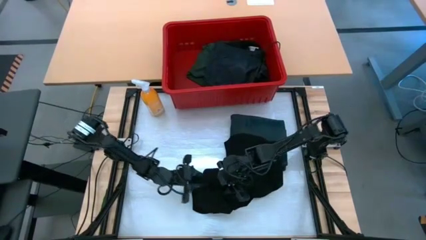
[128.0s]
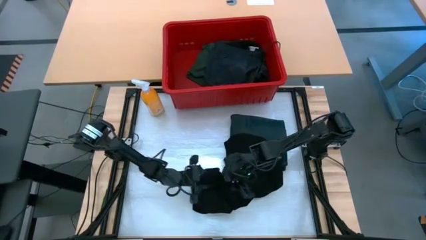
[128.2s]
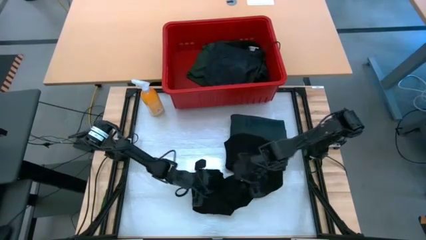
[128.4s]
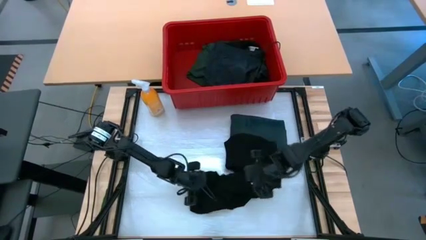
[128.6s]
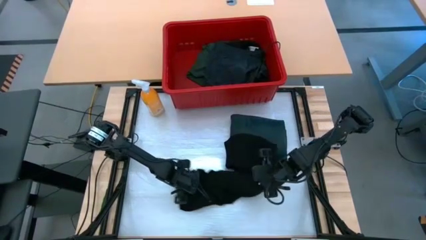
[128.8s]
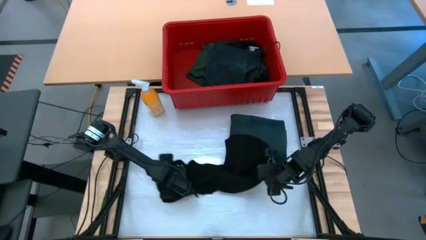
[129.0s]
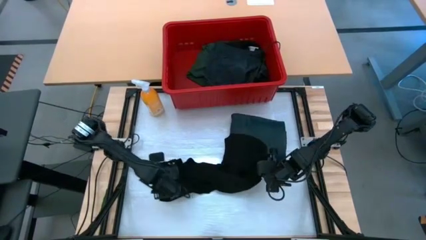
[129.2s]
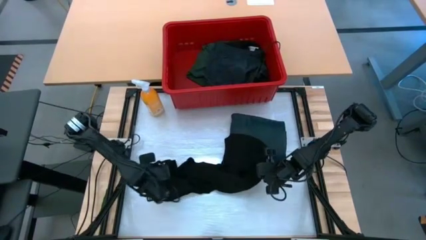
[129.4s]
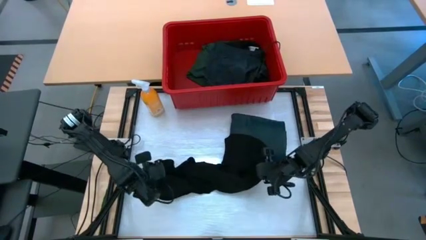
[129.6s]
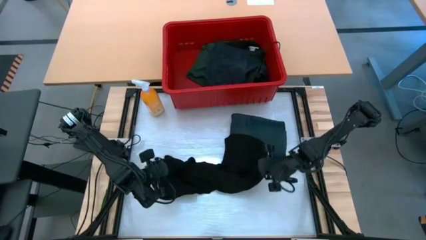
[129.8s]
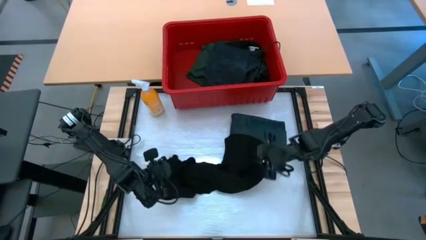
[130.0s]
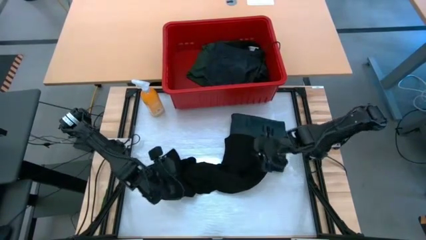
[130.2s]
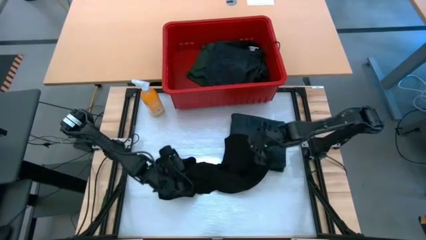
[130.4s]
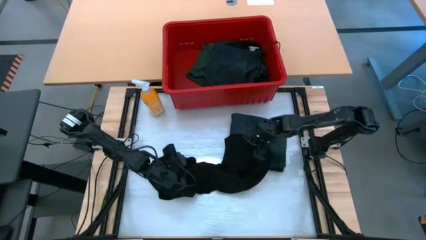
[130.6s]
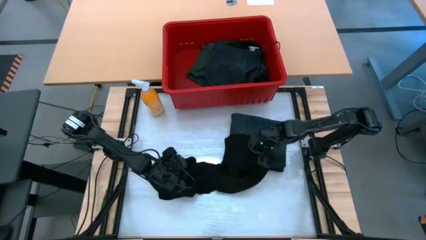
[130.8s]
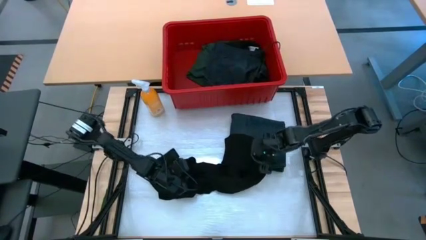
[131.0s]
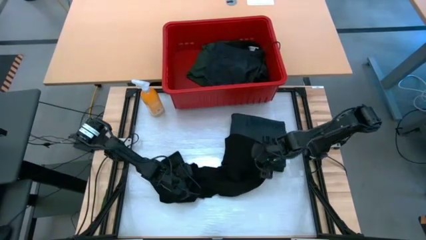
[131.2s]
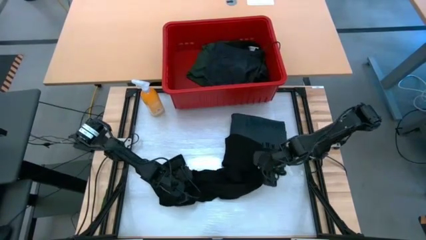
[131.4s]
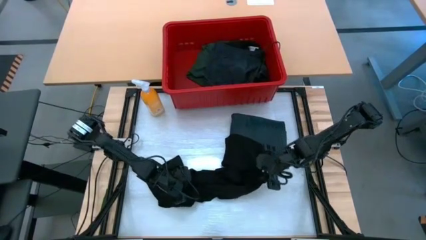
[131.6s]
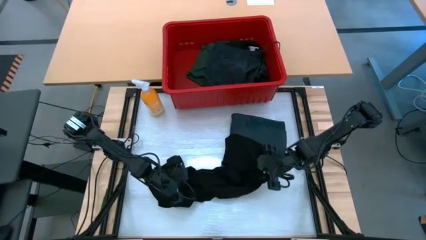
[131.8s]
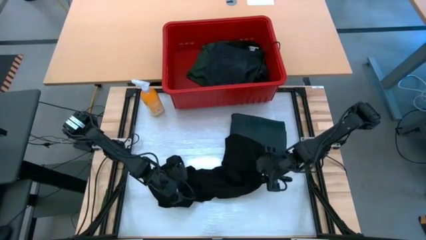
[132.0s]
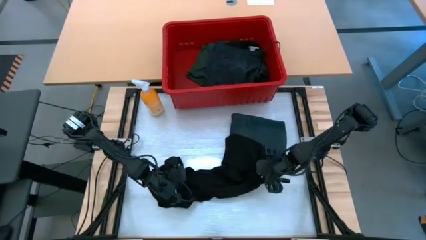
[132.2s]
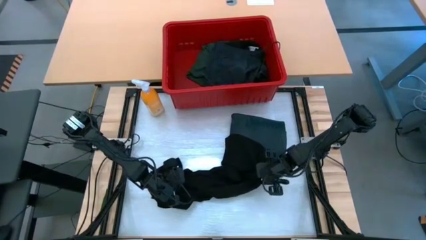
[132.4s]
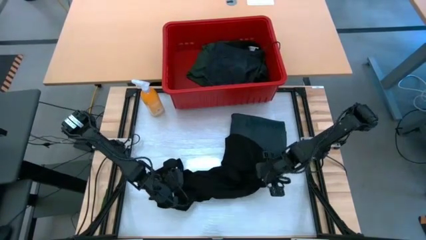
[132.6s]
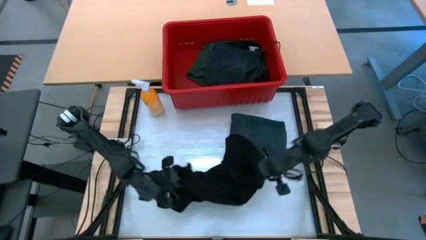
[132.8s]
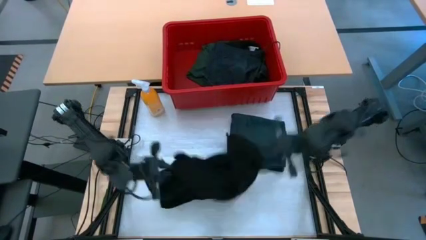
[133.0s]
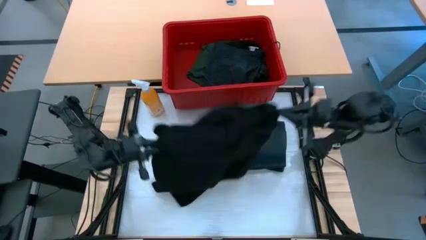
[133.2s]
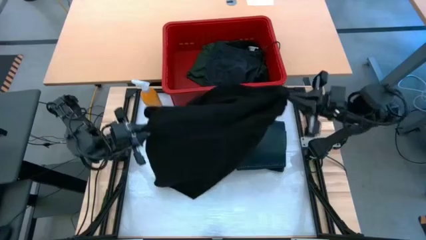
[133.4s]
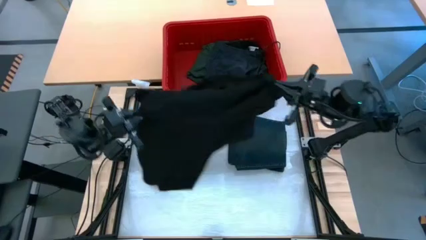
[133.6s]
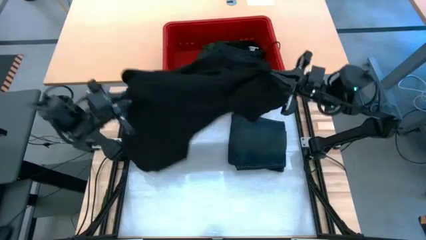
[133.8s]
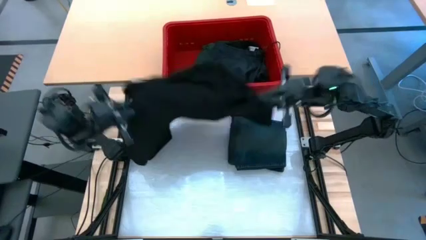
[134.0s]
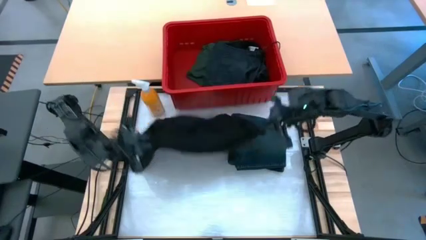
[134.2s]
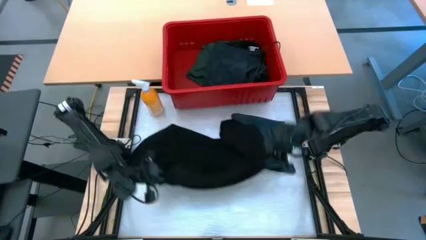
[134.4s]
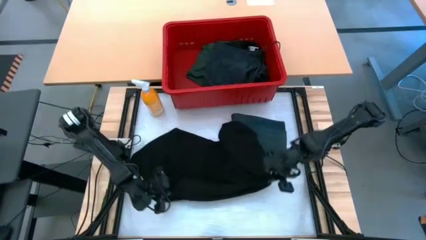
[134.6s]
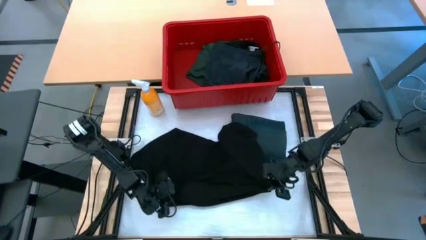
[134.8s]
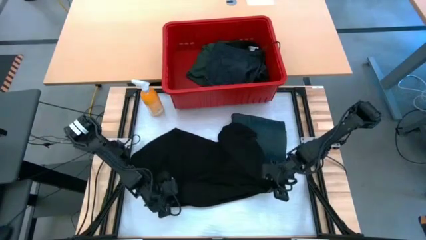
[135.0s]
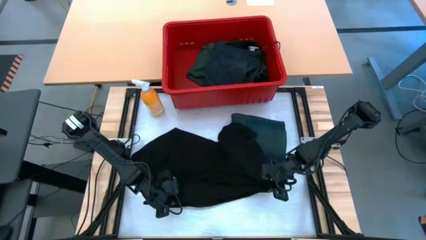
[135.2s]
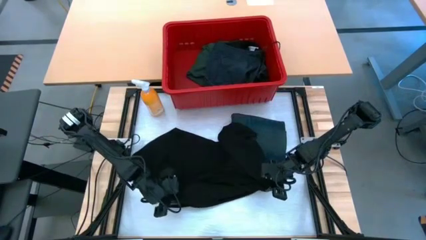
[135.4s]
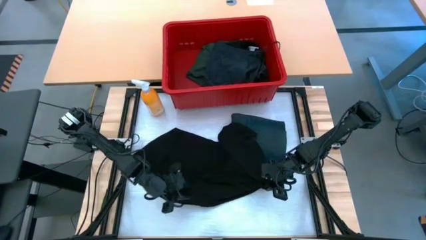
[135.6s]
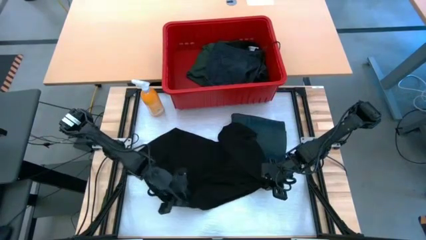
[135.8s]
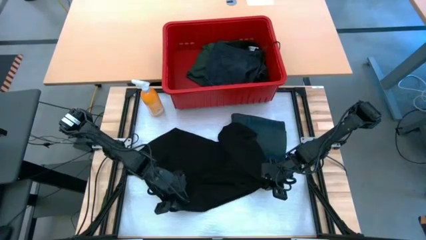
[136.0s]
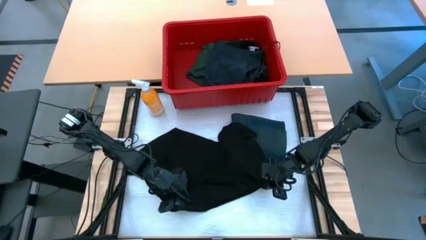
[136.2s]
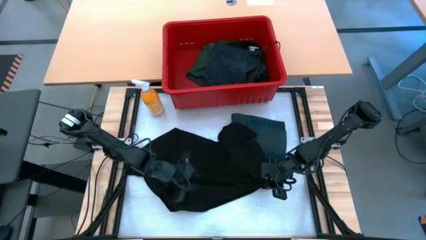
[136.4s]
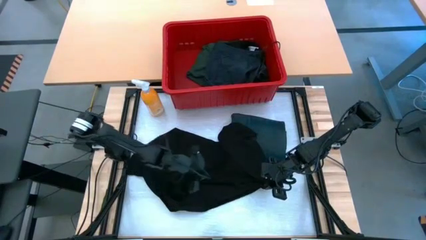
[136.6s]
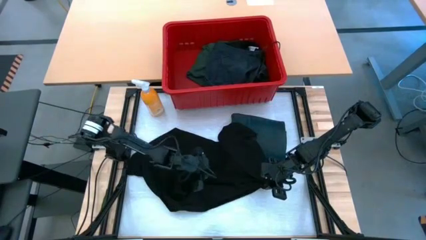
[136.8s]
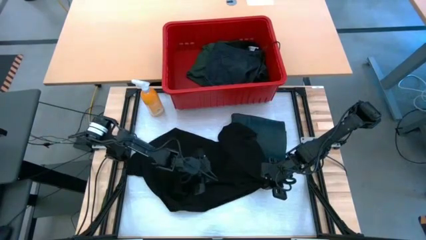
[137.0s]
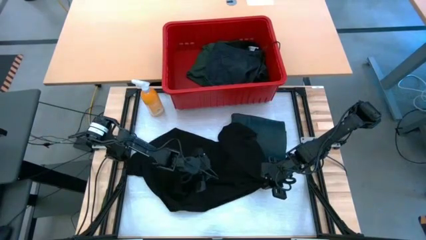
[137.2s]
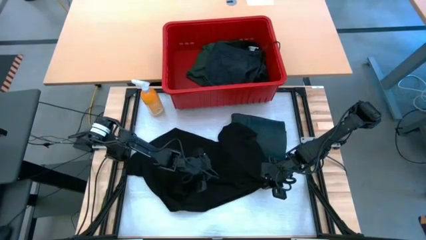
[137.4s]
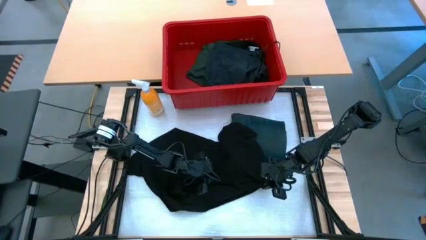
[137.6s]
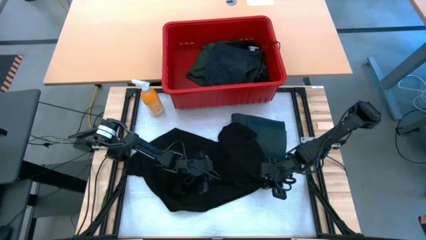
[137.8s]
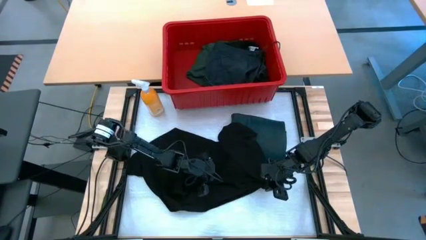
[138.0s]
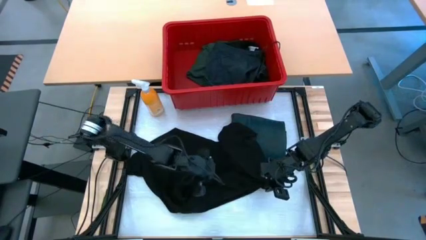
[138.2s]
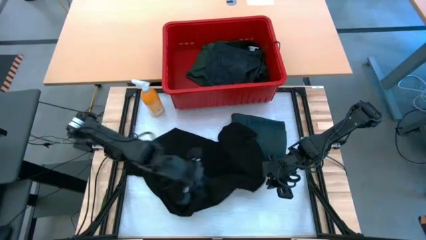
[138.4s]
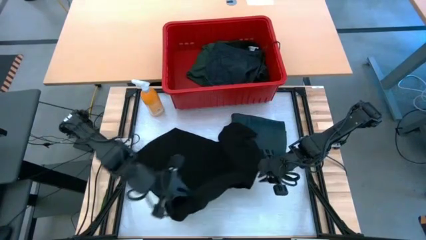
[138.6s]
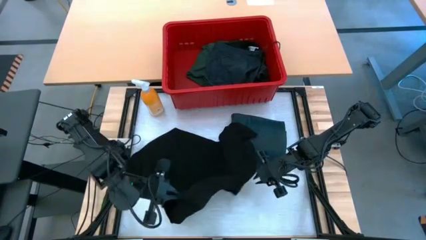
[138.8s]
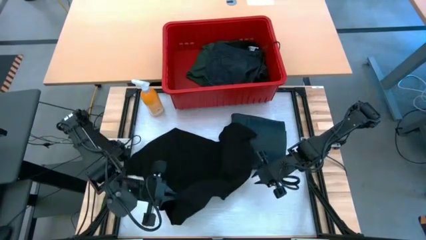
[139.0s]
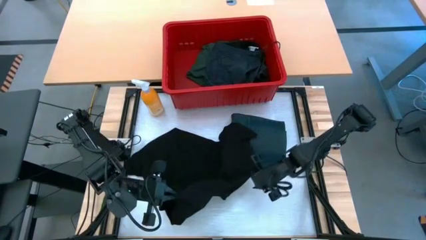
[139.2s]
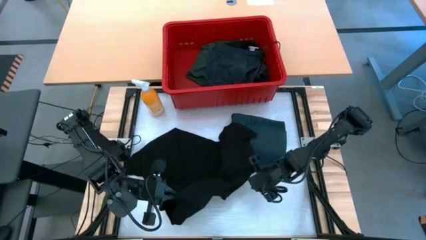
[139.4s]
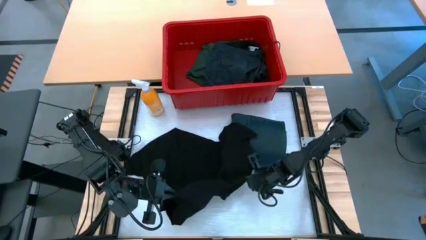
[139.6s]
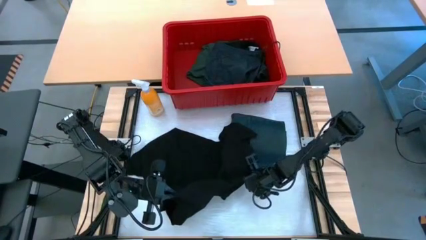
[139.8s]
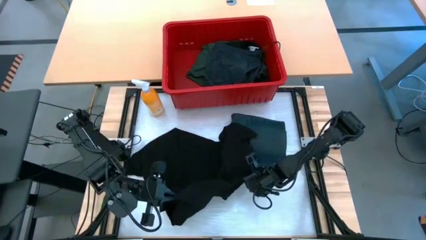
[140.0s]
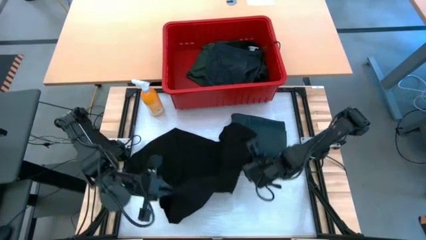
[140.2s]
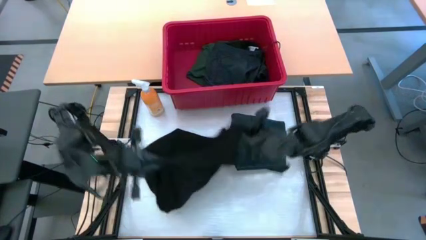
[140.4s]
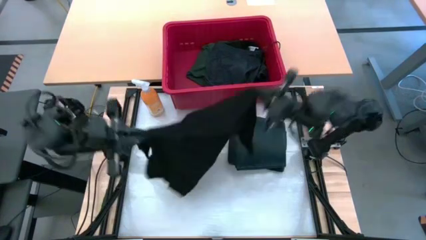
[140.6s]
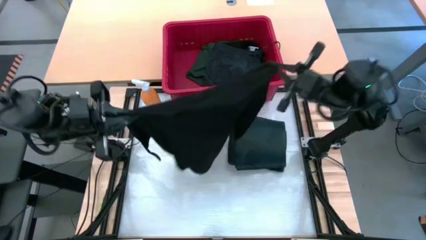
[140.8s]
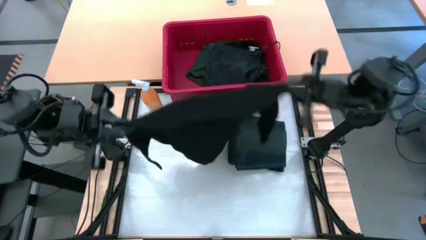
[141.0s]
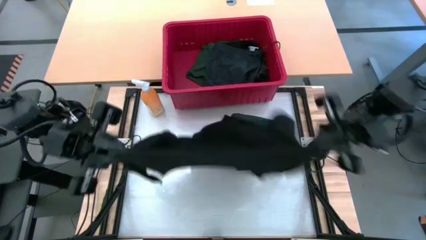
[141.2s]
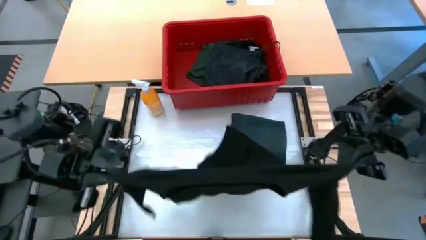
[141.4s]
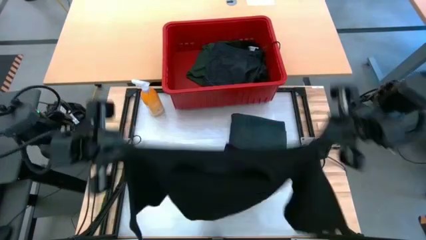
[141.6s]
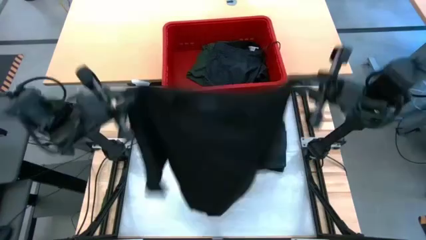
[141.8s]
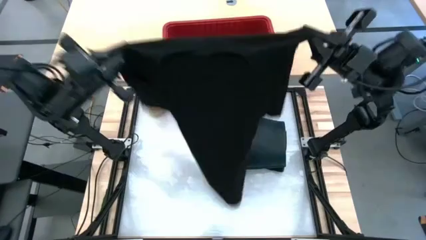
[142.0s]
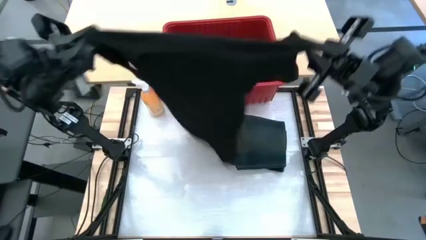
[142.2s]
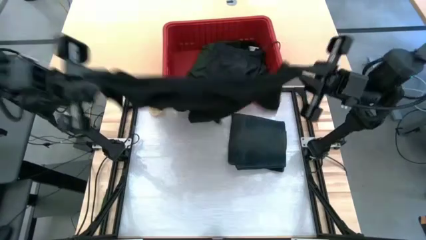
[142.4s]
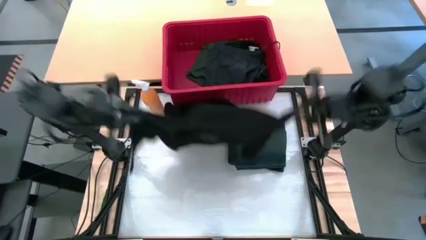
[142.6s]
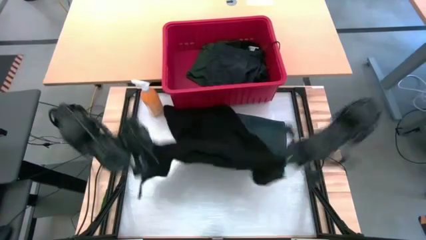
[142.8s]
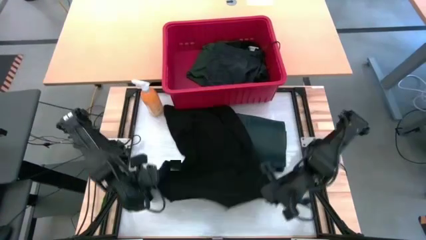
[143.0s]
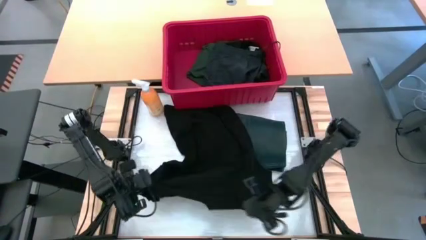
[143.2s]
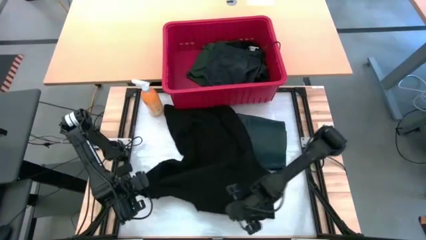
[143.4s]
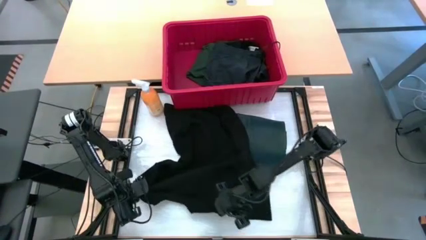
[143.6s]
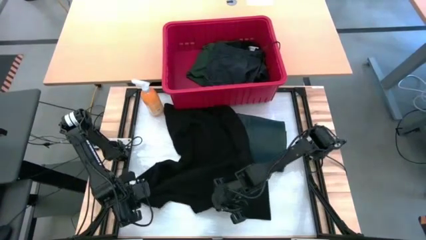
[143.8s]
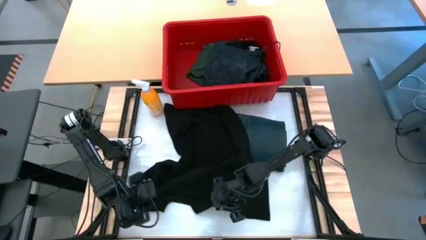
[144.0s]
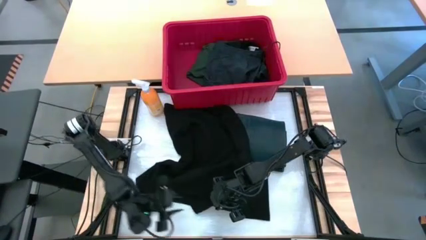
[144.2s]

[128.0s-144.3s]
Task: Fold Laundry from Bin
Fold the black shirt
